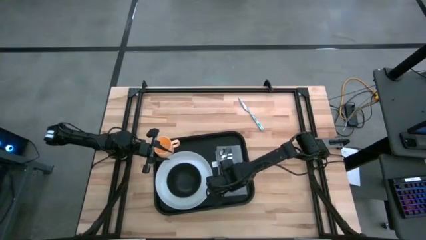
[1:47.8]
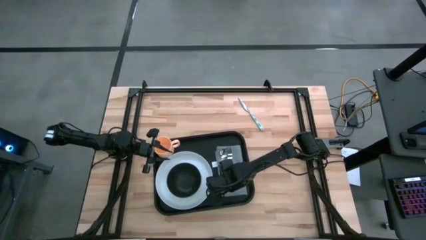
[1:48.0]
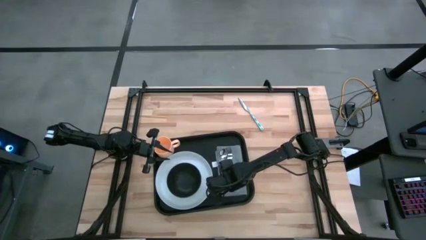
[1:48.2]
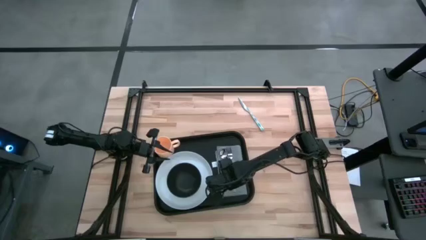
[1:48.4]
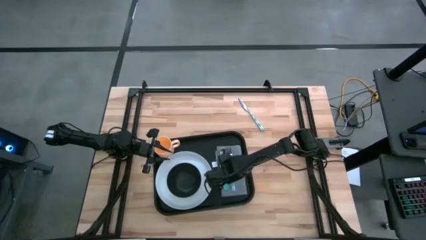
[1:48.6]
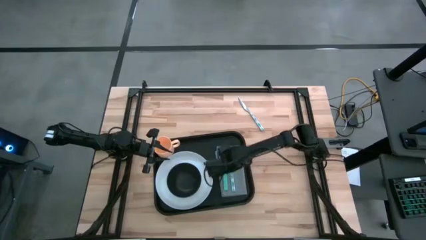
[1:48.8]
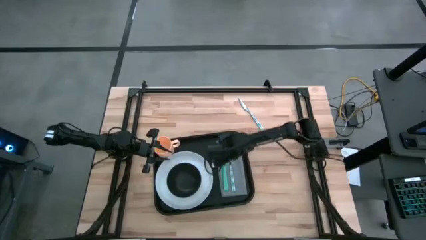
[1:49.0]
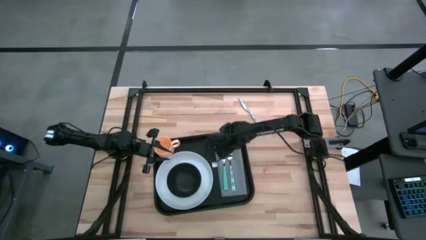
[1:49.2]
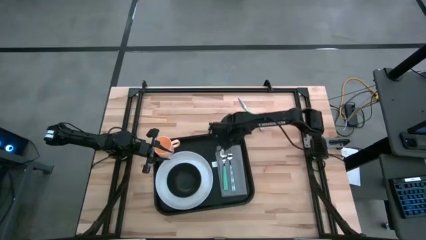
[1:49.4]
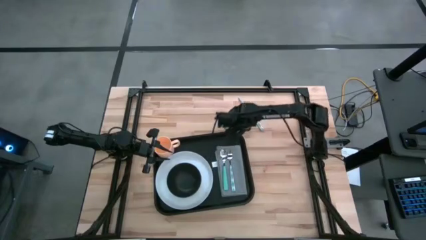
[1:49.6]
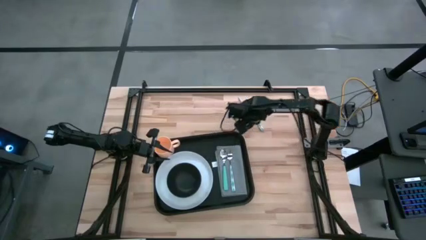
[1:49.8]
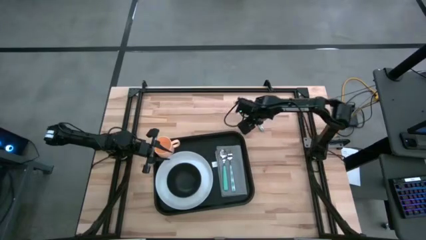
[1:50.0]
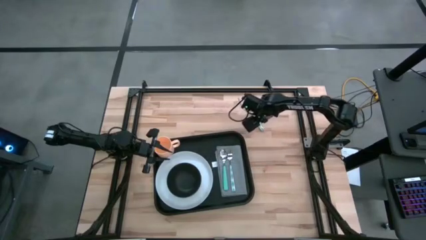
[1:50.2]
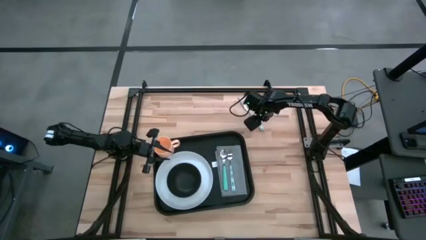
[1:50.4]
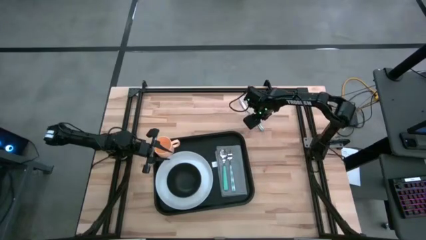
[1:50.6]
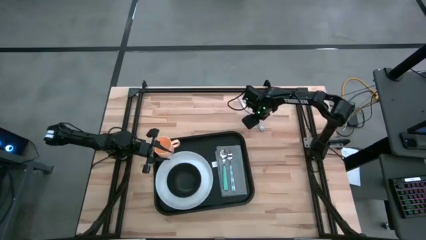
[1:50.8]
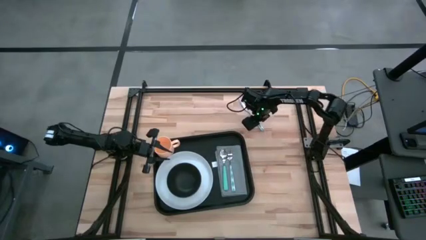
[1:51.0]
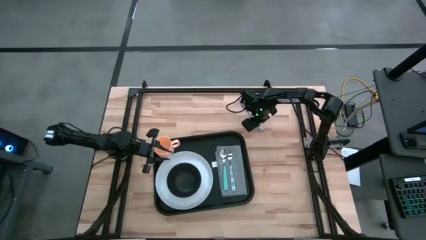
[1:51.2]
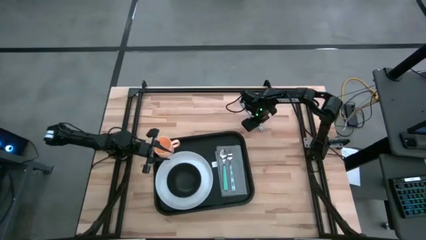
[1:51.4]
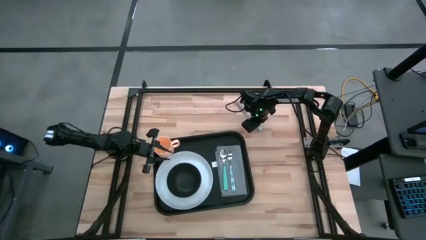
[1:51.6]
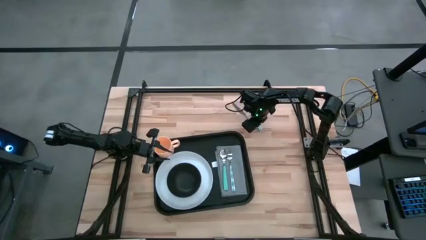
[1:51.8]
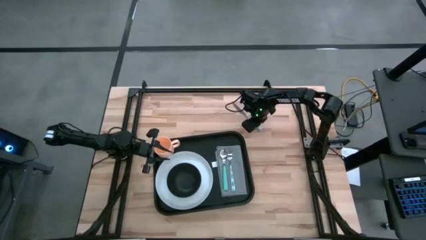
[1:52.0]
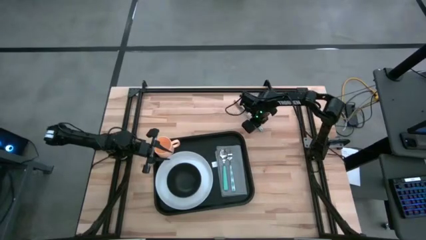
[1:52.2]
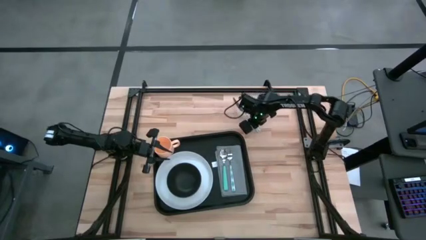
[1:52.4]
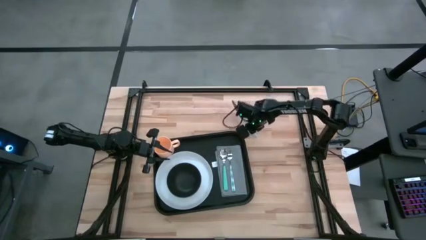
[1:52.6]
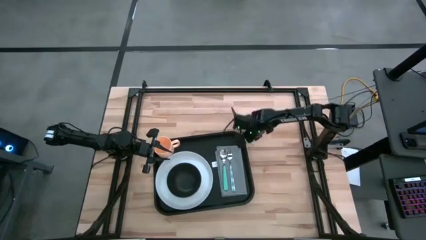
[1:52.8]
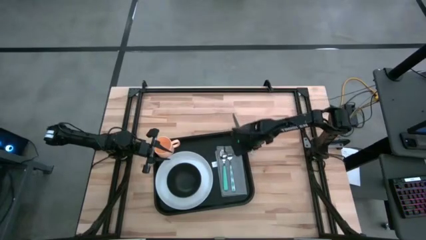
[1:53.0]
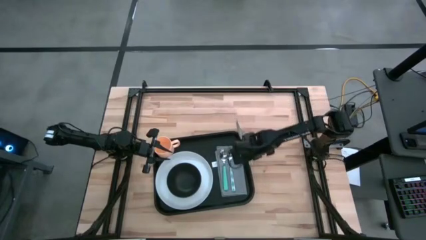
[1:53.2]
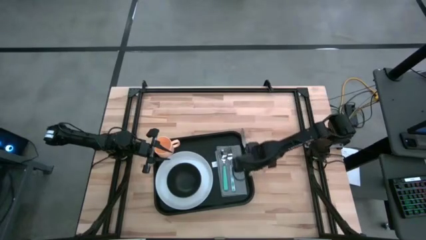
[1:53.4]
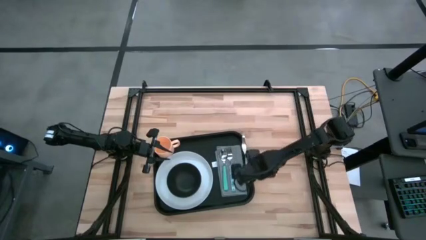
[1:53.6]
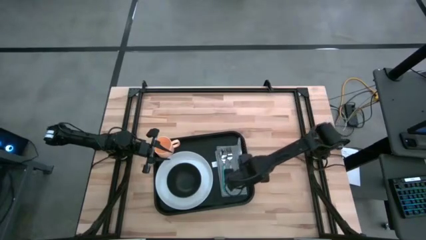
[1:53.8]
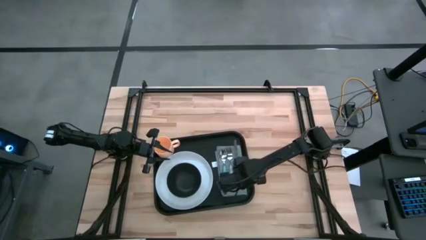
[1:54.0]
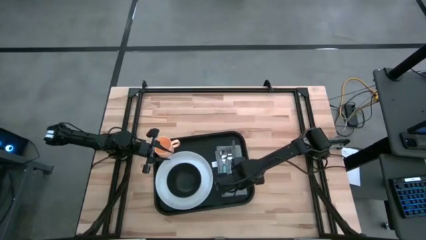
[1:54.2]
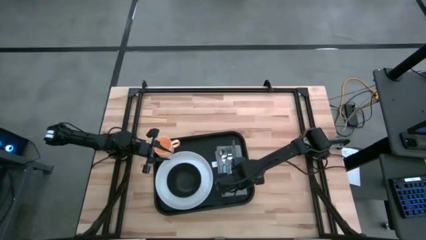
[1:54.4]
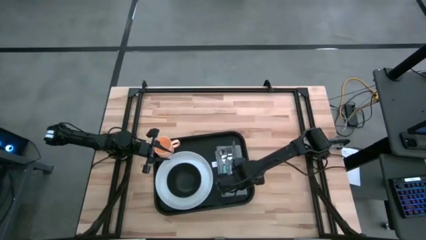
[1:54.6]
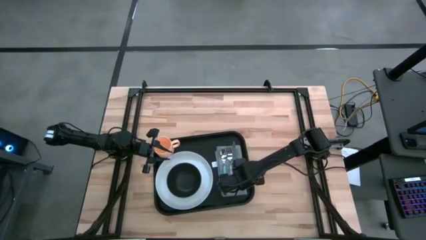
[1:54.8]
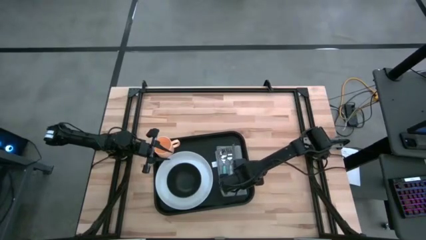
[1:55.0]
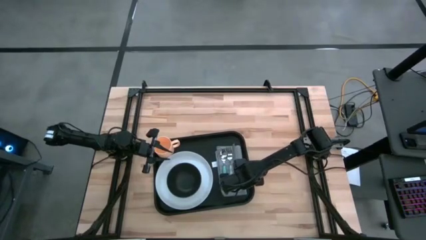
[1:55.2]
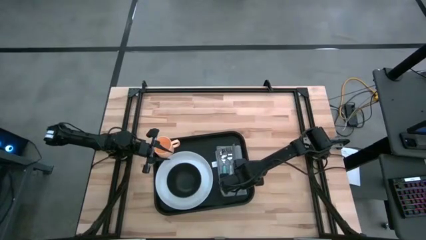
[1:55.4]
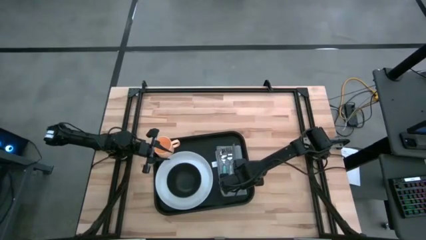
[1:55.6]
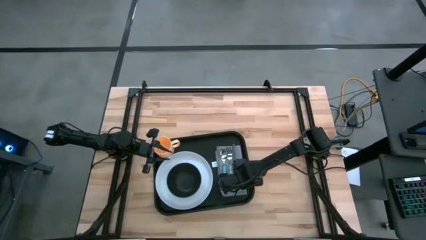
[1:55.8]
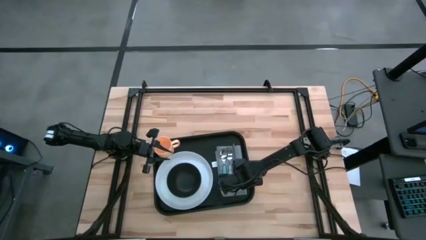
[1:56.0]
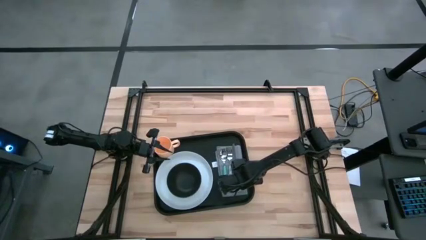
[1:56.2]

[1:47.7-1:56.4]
Task: Set up tray
Put the green patterned knife on the gray napkin to the right of the green patterned fork

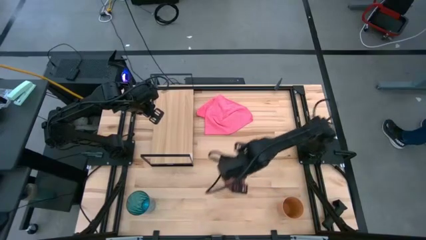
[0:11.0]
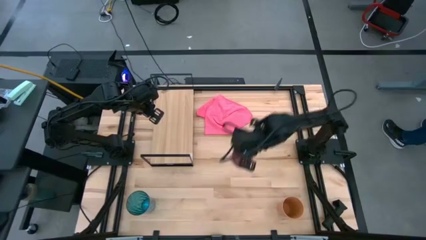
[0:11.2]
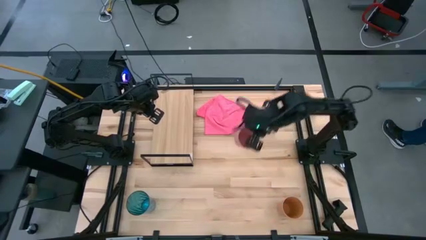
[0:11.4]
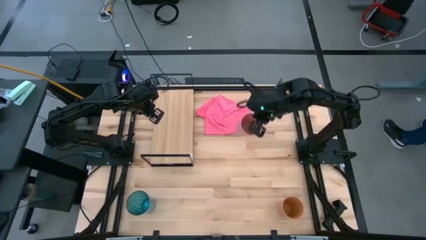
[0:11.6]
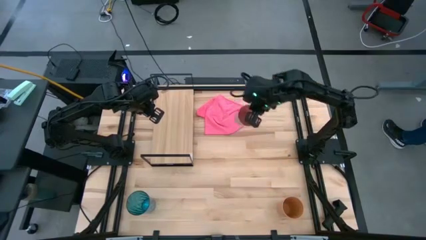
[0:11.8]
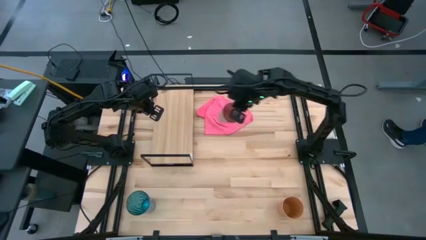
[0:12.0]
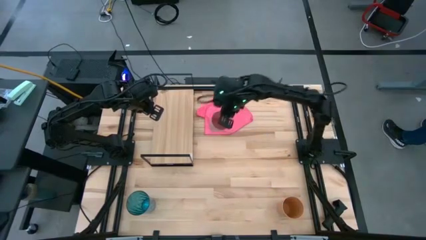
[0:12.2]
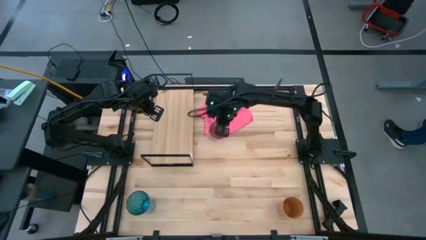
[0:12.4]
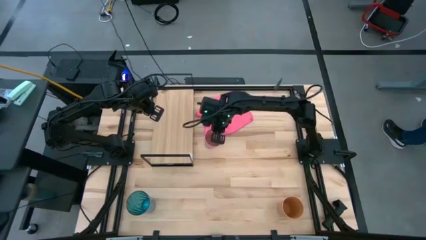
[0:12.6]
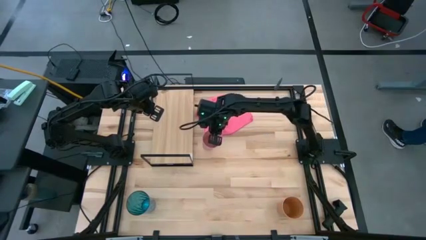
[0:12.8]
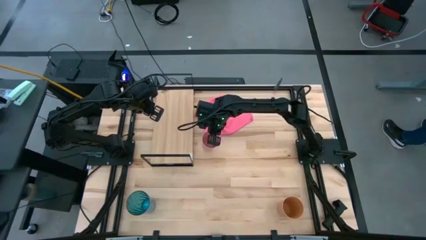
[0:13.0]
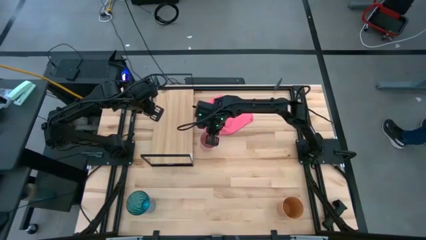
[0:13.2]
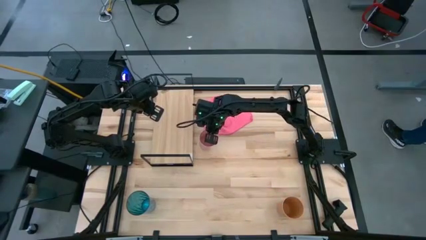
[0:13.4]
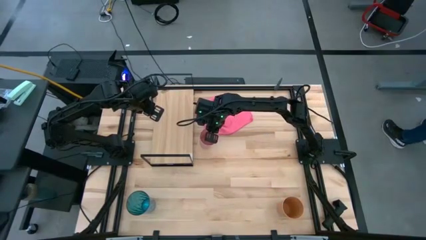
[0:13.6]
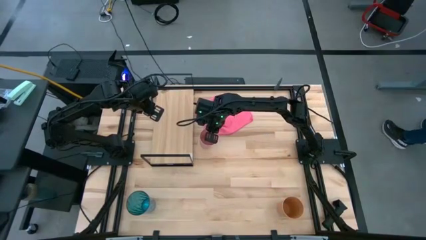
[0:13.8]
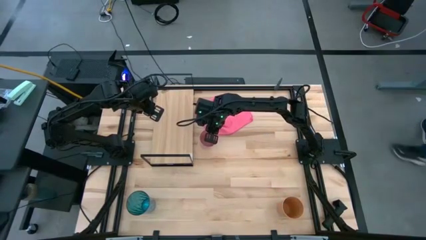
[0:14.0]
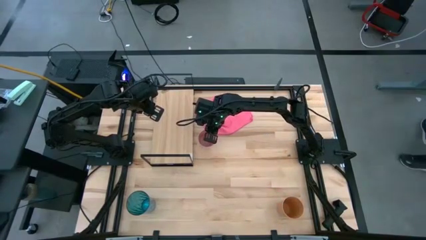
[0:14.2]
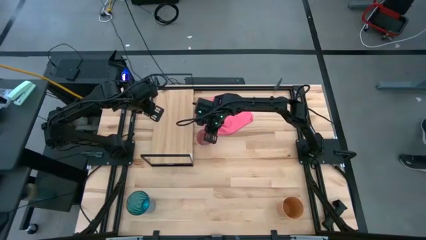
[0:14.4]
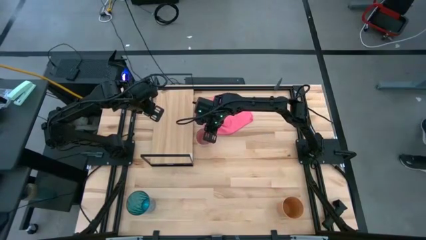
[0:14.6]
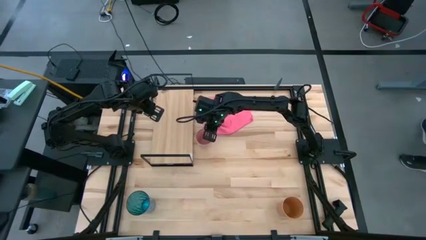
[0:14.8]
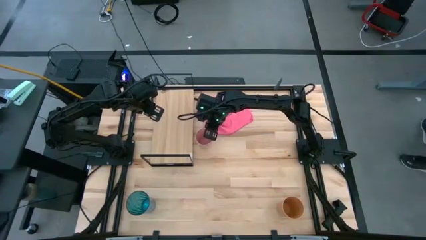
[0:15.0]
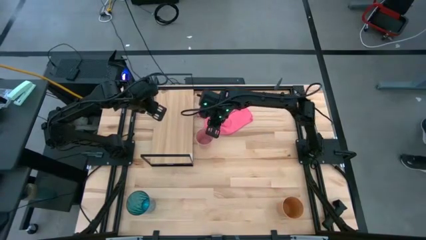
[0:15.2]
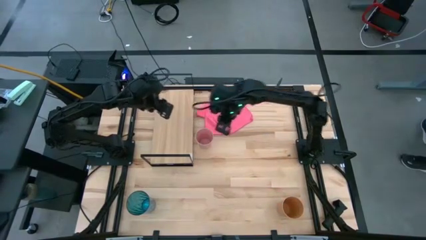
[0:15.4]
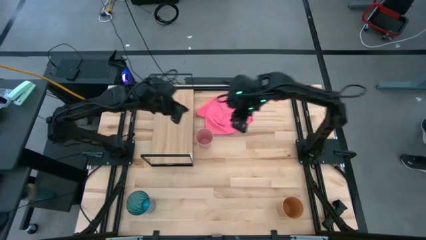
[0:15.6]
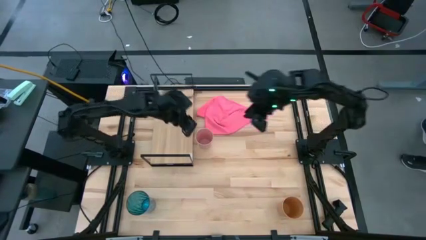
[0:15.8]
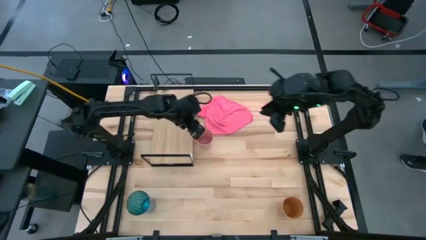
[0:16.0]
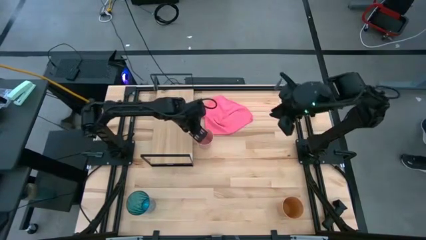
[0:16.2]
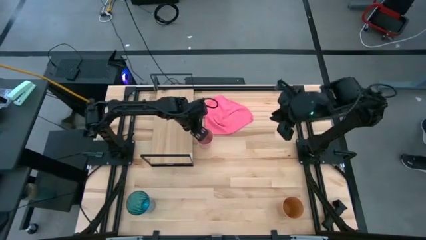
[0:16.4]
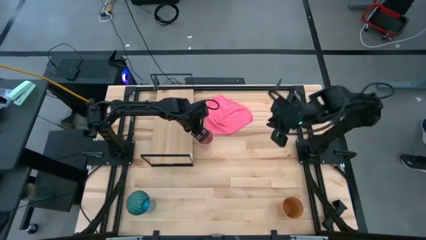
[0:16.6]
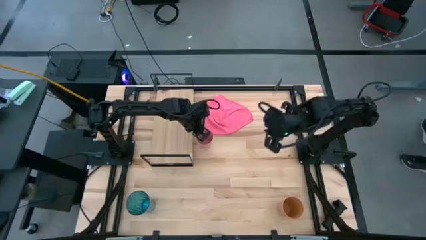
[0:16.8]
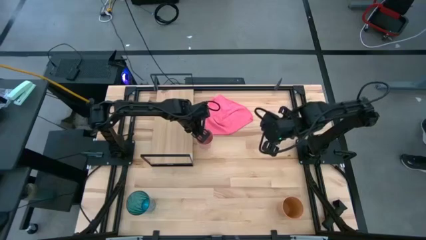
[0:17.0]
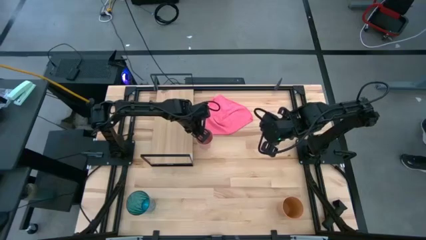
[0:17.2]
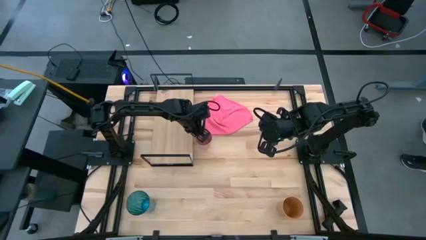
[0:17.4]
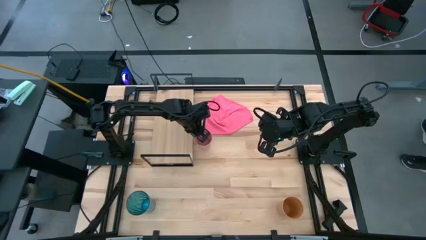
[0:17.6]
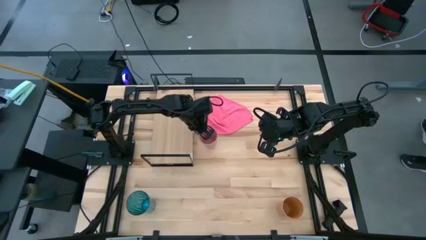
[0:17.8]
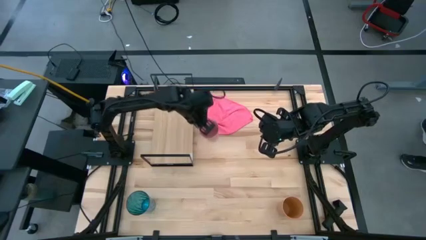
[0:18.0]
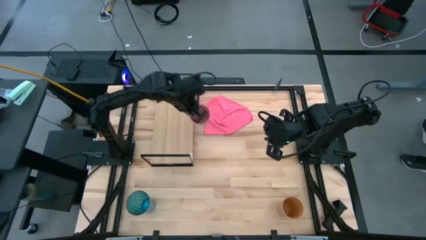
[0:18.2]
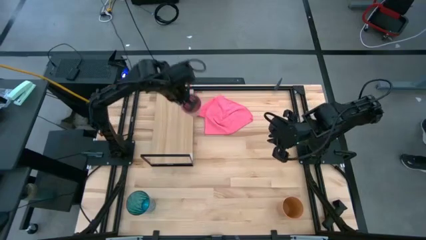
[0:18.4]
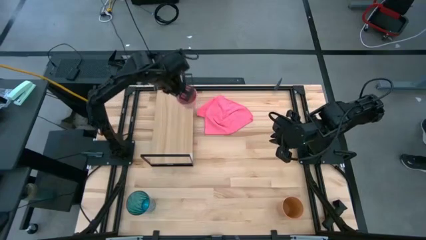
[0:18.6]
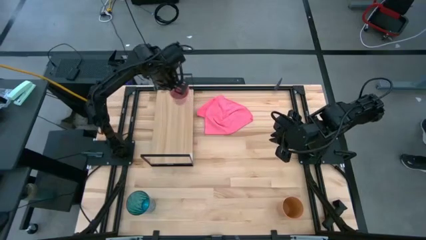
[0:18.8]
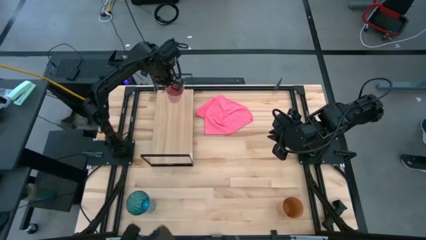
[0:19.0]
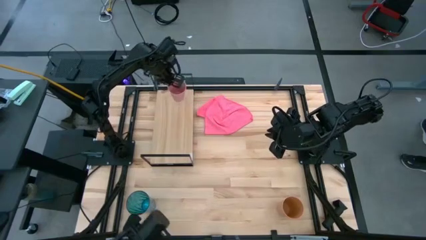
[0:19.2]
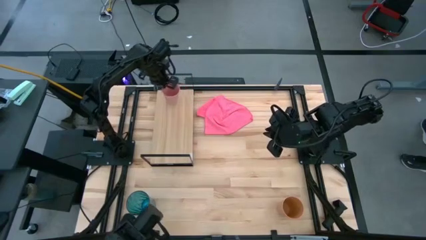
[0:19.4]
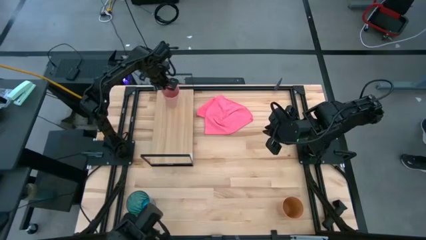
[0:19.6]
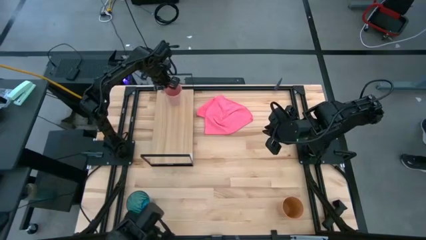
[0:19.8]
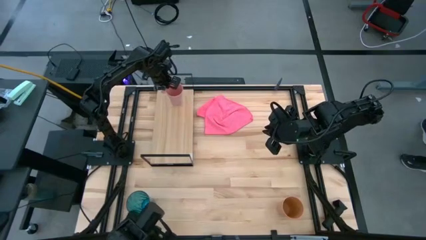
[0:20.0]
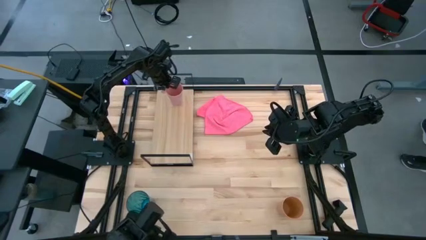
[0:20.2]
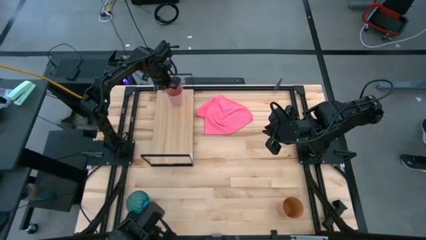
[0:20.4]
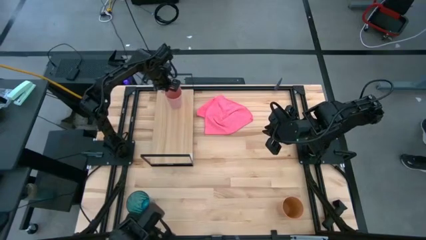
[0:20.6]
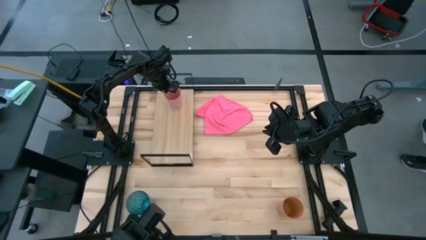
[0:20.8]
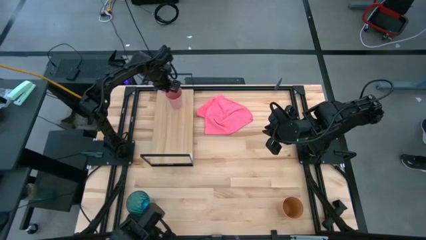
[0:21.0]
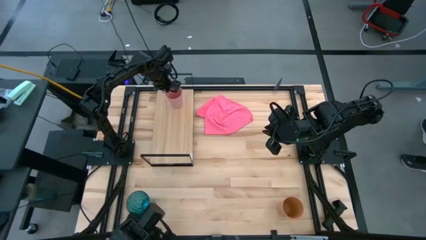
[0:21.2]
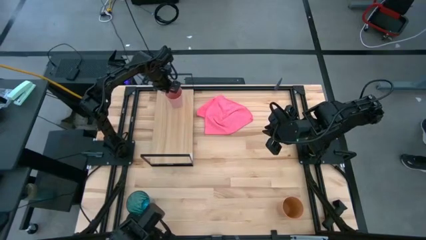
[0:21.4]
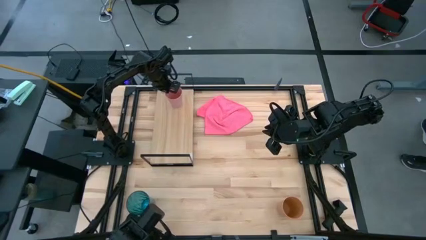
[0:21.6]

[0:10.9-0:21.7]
Task: Stack small to large cups/mugs on shelf
Put the pink cup on the shelf
